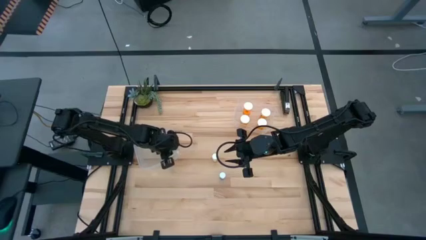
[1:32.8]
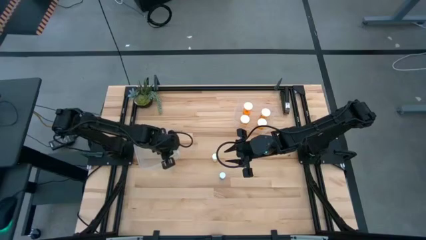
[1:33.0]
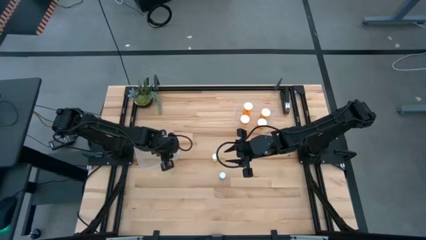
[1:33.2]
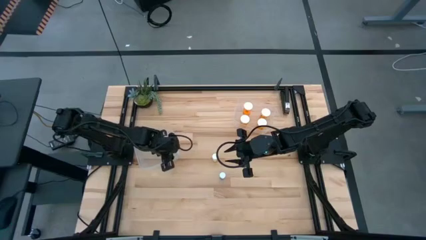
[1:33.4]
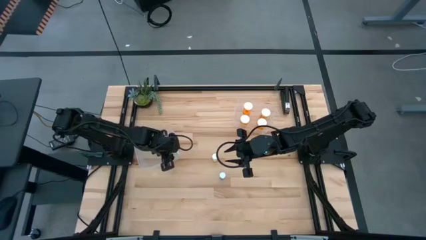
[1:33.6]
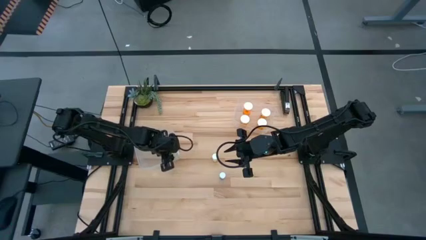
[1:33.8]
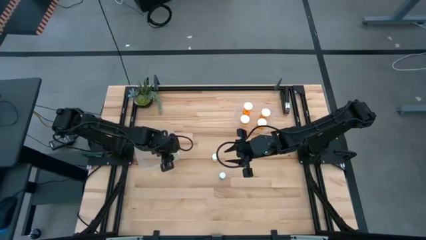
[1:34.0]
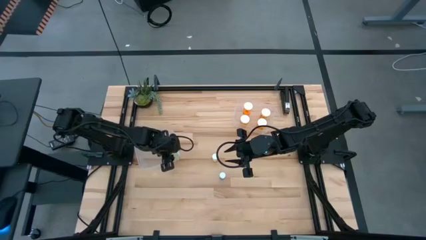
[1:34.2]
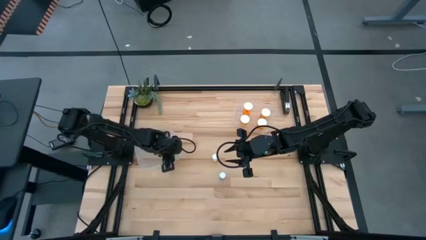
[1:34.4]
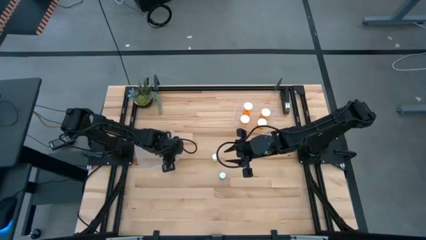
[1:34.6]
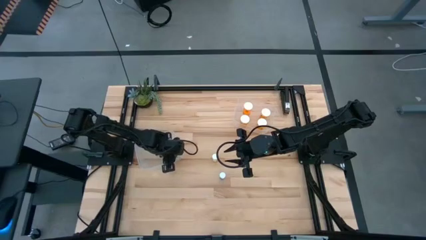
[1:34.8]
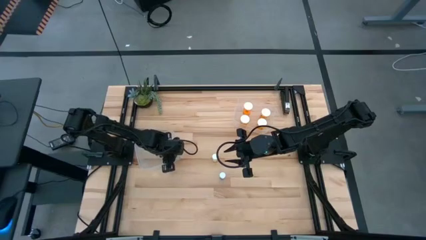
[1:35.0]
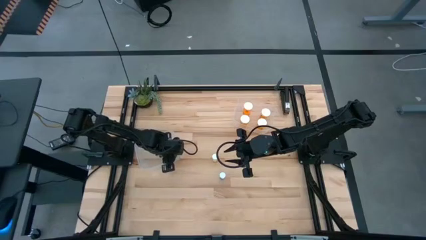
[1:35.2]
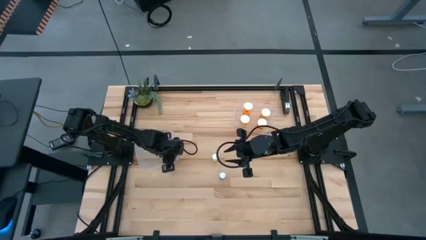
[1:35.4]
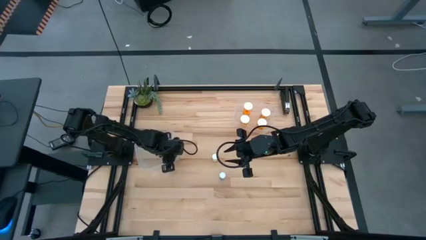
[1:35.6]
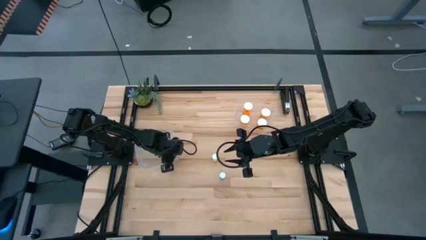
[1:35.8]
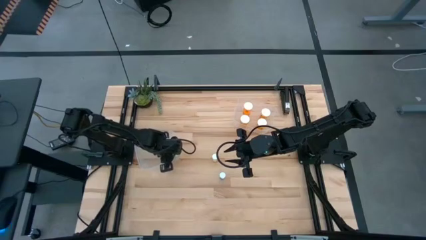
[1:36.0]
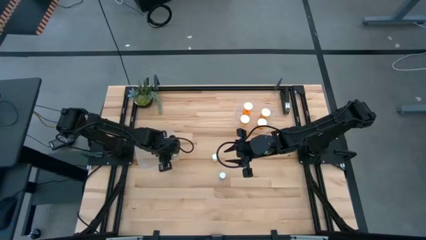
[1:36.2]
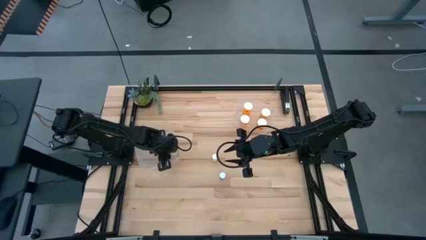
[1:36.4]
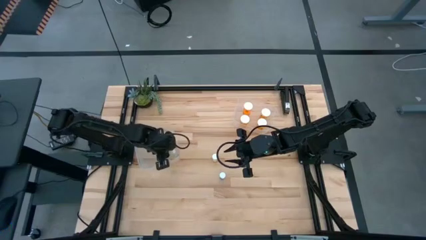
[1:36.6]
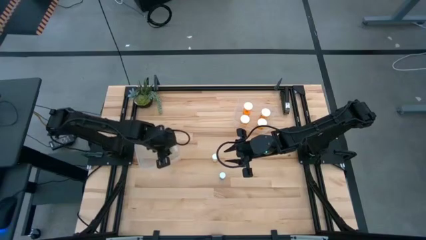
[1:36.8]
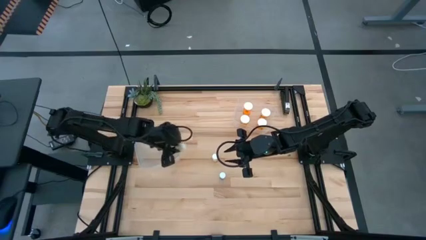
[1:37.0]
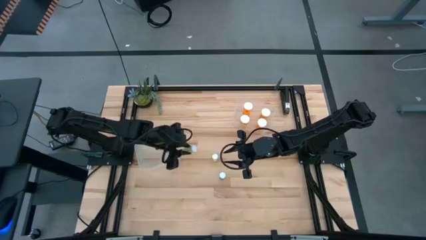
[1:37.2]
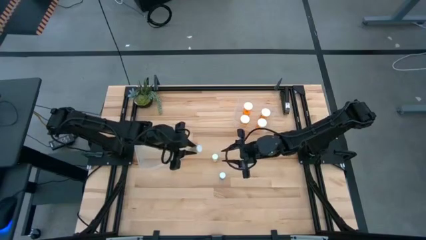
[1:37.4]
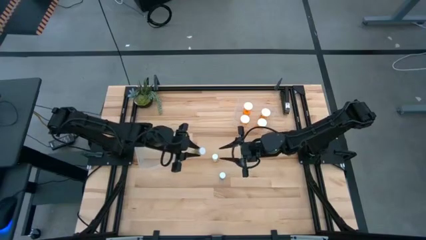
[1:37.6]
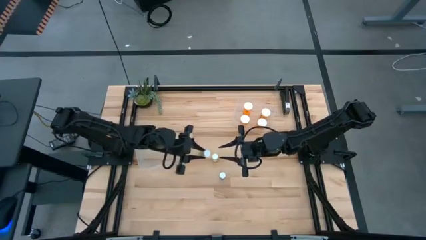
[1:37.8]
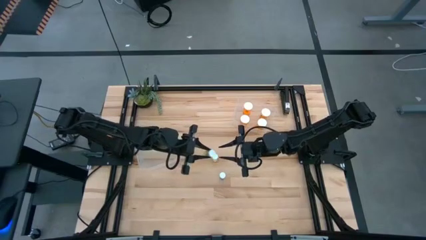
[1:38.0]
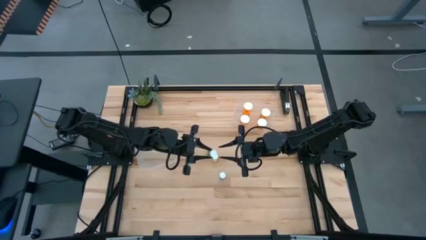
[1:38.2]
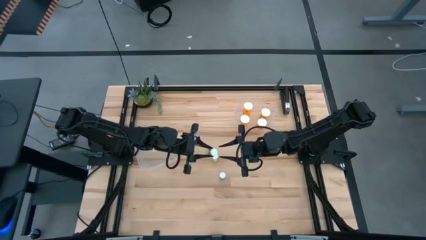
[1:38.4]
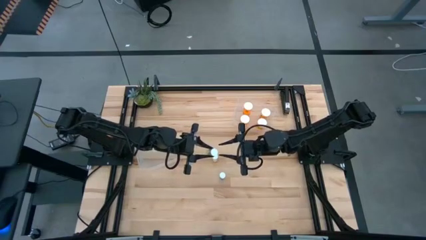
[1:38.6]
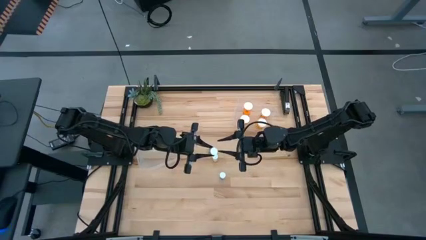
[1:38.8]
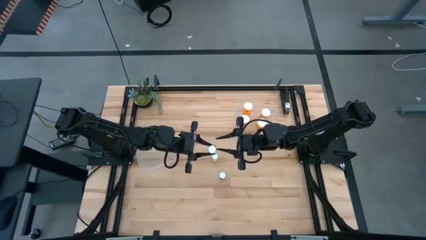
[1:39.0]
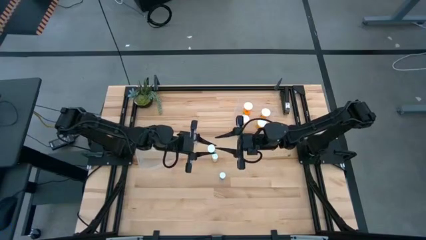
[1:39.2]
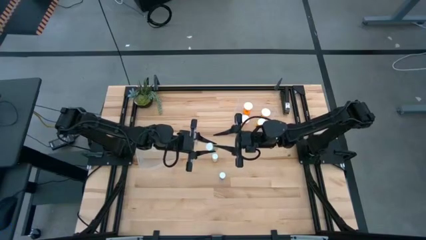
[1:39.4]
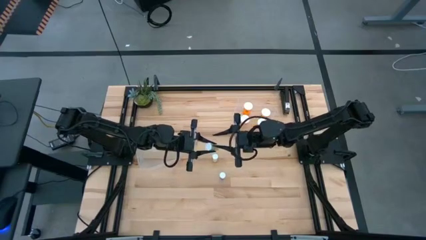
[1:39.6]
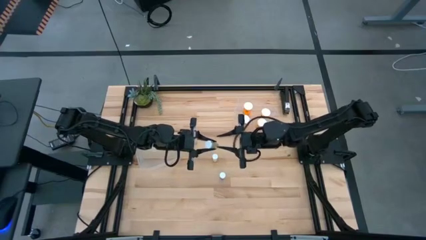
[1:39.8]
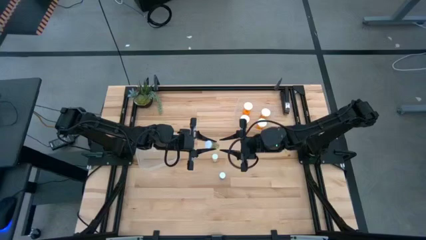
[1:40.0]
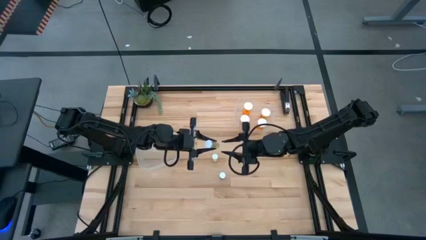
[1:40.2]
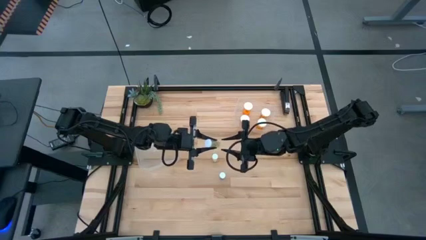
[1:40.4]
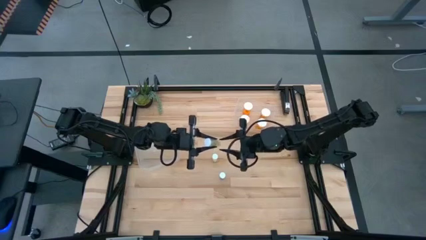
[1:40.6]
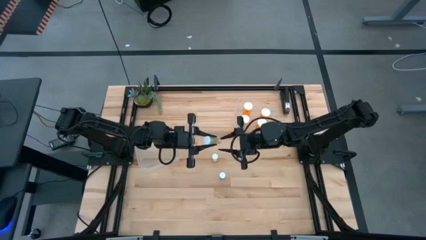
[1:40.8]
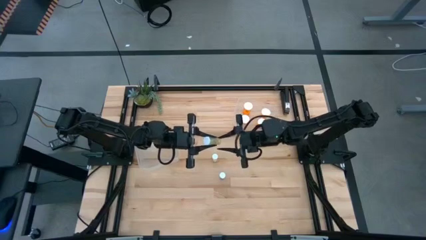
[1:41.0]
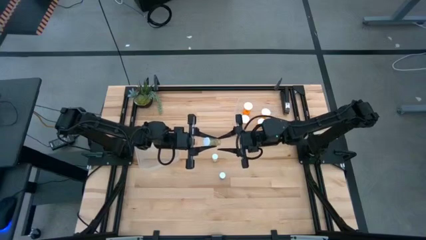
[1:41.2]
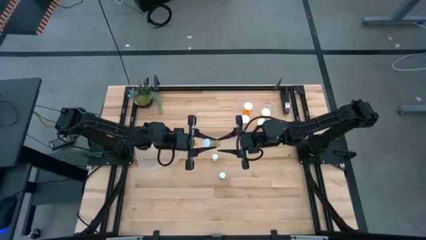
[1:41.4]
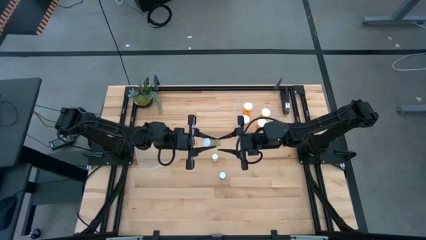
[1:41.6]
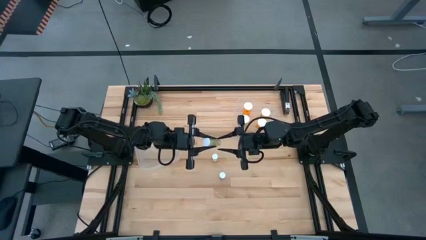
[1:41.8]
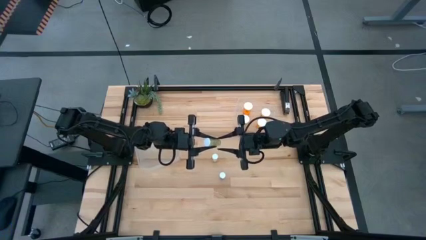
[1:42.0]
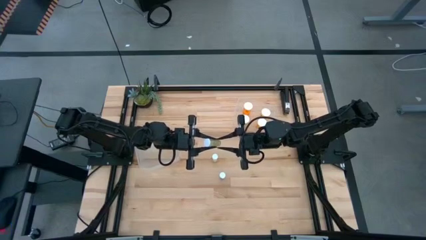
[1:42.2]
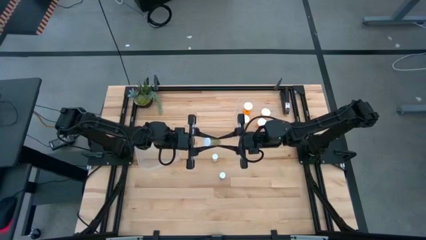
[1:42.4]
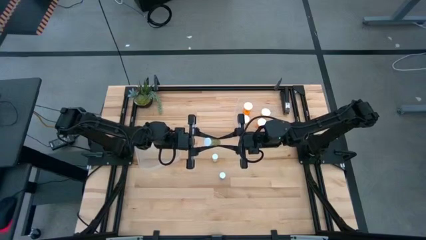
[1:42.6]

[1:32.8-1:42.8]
Task: Pick and place medicine bottles into bin by pill shape (circle, oval)
Adjust the small orange pill bottle in the left transparent bin

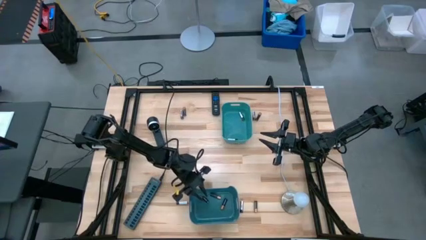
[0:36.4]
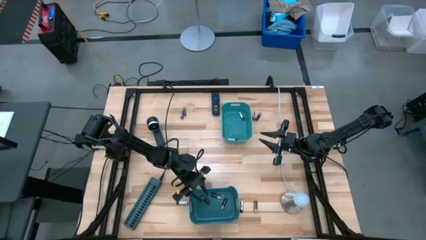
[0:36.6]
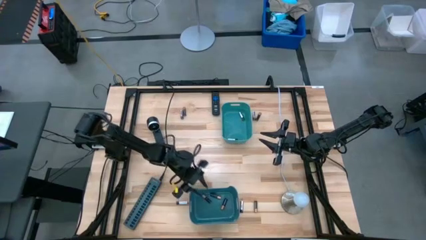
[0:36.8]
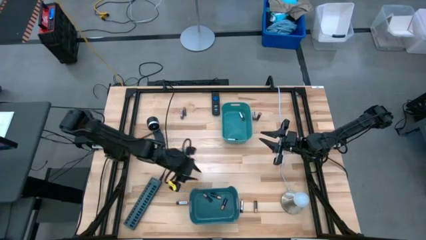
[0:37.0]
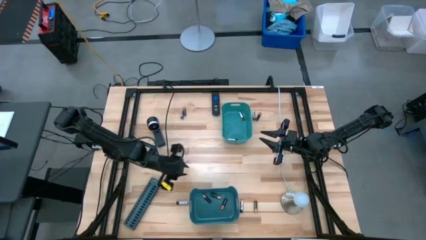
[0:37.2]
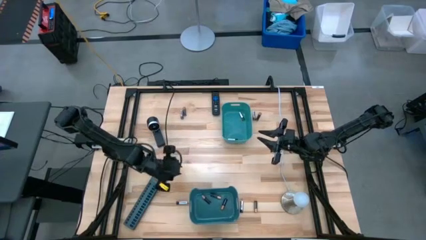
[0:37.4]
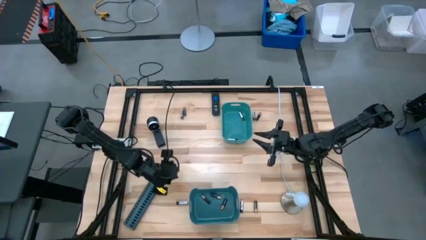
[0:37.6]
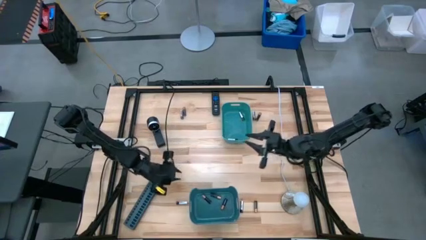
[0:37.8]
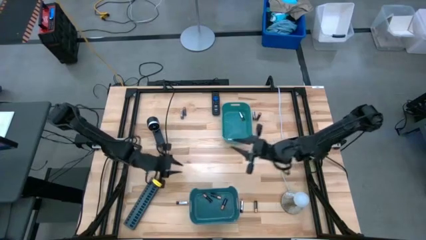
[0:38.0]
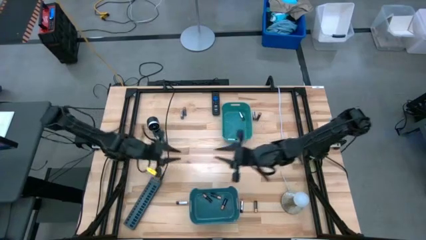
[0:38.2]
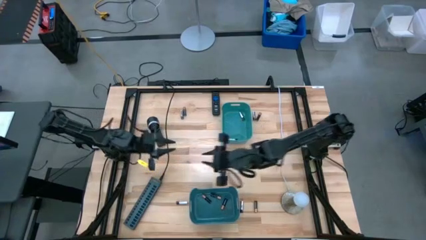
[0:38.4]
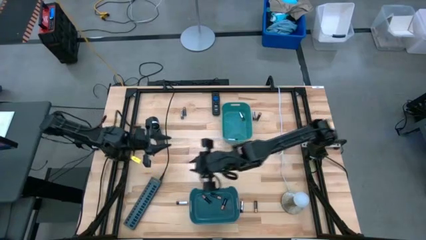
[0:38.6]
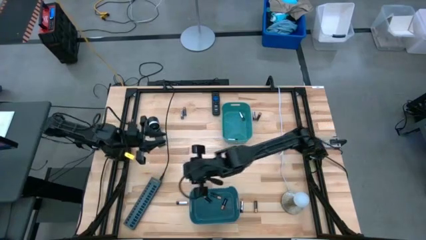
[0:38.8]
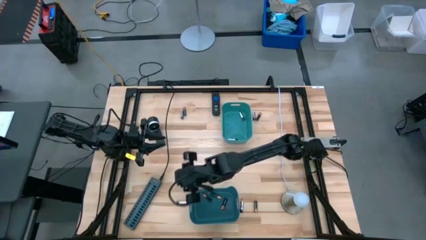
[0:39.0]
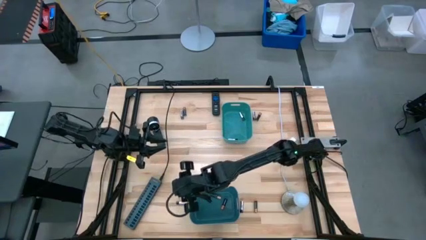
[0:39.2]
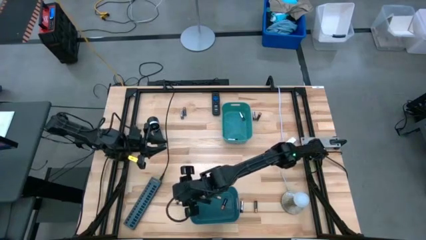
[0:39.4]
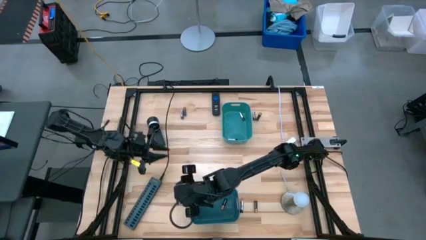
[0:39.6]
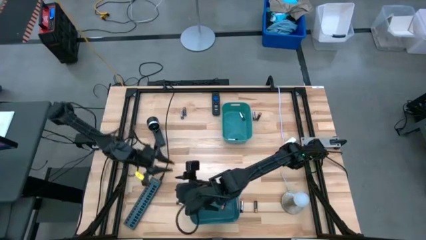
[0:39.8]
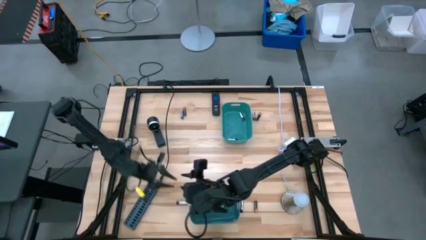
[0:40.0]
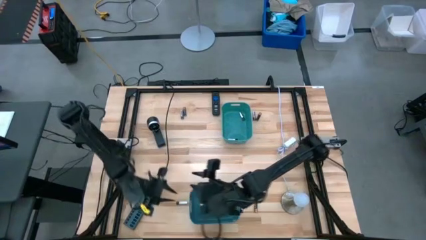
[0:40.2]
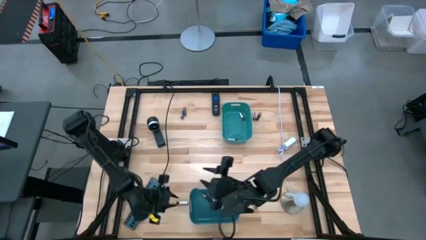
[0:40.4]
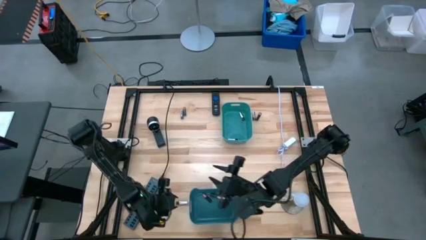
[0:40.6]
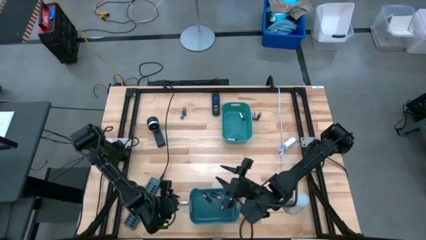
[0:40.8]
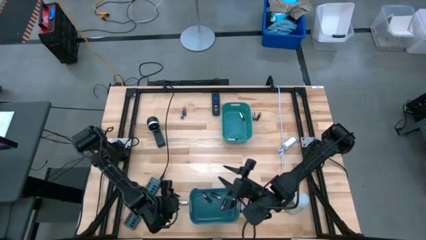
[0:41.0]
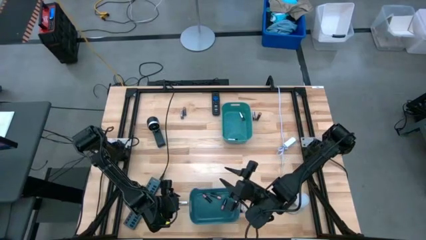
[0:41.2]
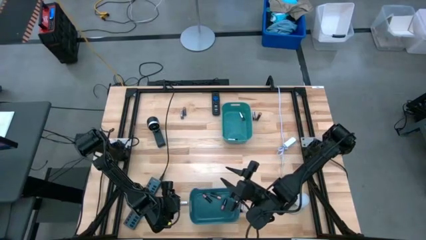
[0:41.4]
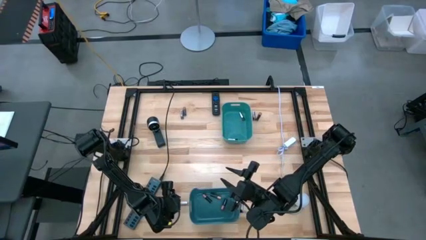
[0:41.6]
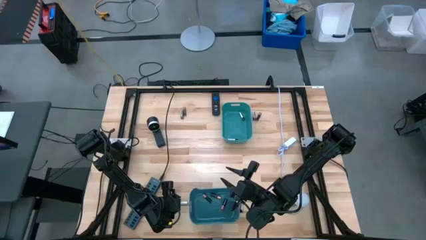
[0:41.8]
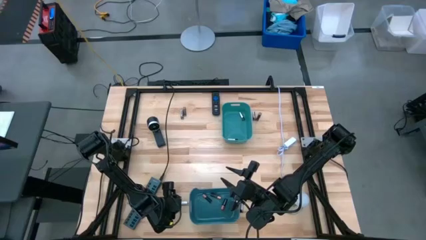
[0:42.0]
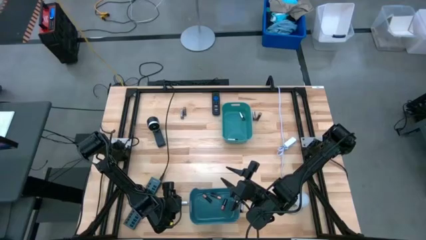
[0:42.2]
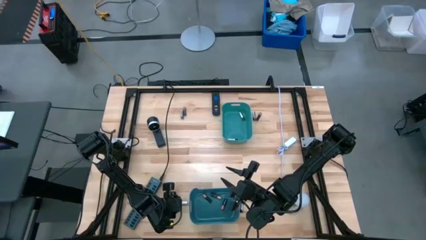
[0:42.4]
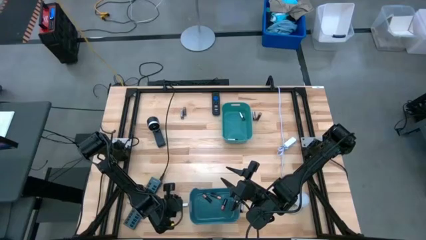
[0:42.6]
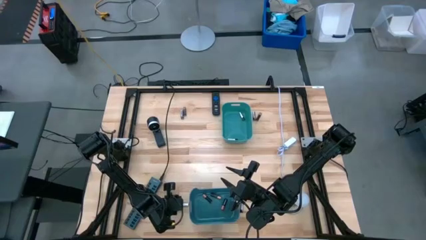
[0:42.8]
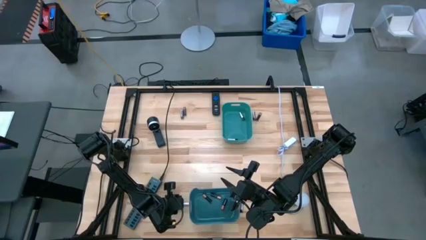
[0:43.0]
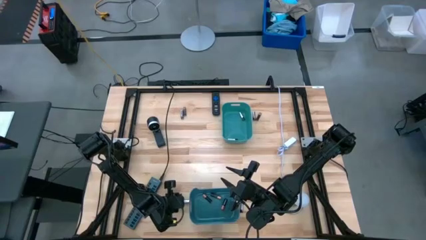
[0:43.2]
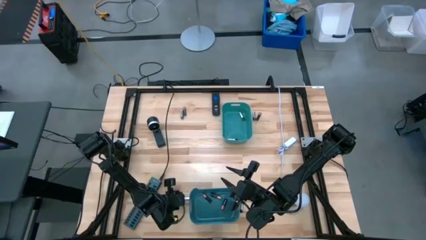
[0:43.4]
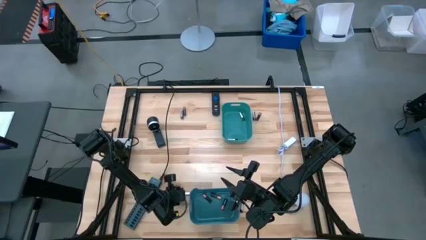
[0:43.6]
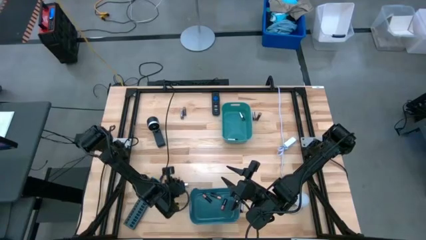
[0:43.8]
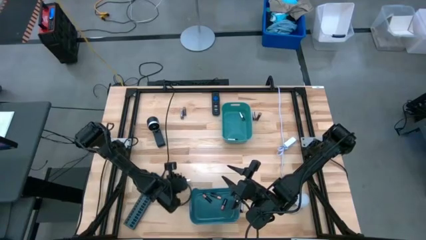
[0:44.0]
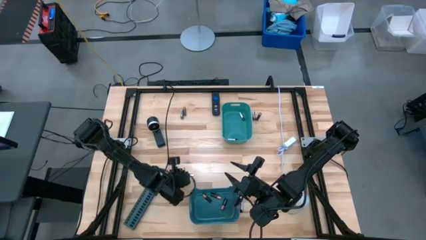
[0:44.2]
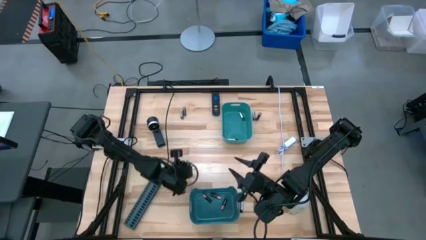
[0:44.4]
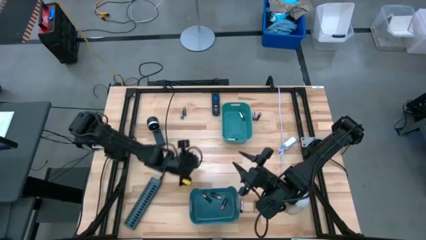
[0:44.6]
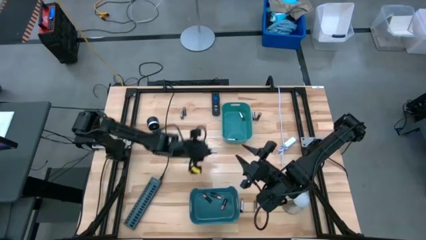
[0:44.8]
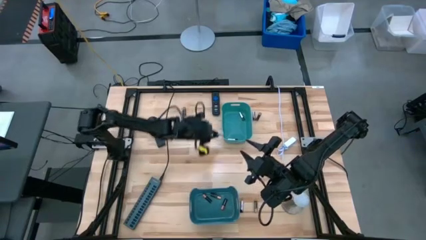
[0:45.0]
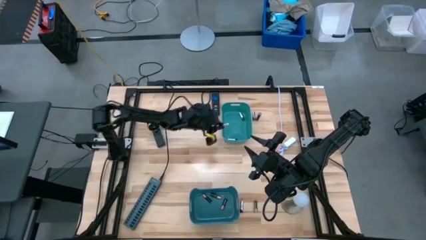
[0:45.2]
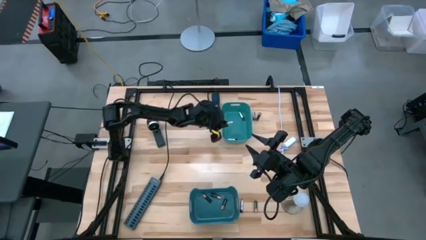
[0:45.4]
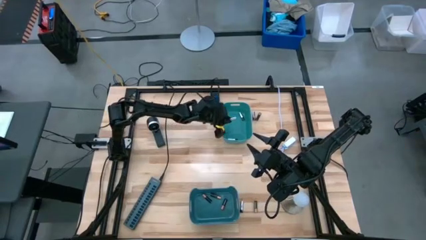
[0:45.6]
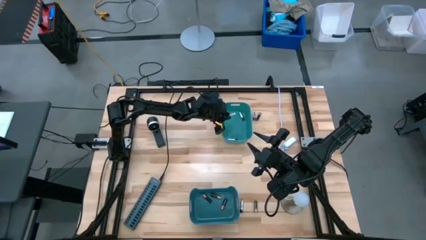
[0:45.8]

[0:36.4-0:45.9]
Task: Sort batteries
Put the silver battery into the light blue bin
